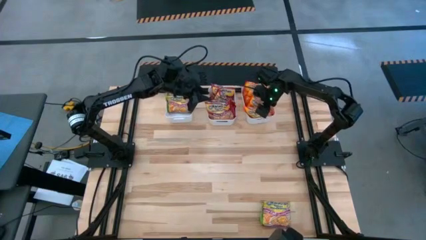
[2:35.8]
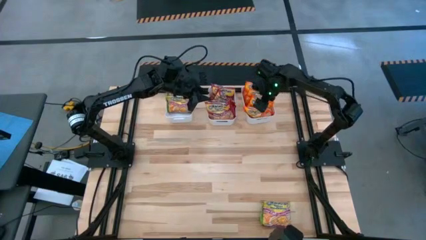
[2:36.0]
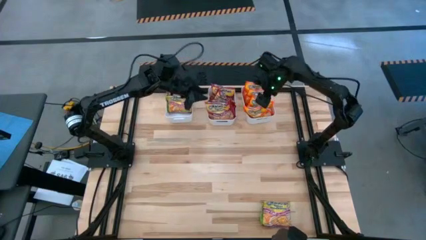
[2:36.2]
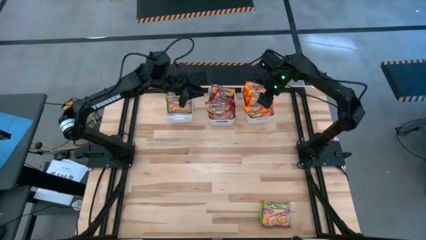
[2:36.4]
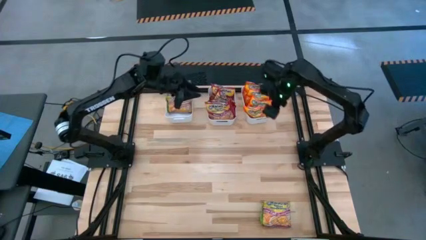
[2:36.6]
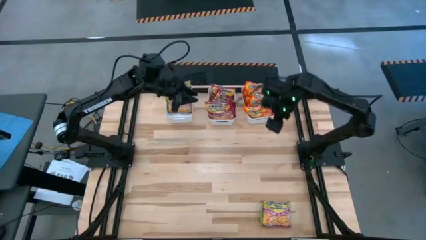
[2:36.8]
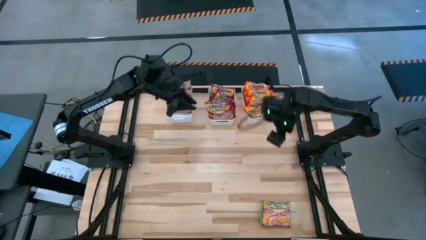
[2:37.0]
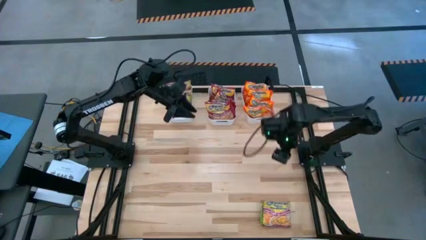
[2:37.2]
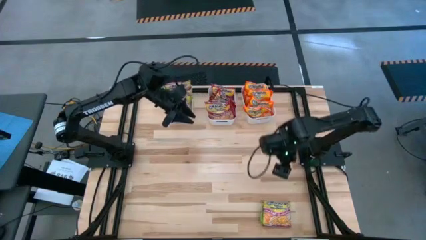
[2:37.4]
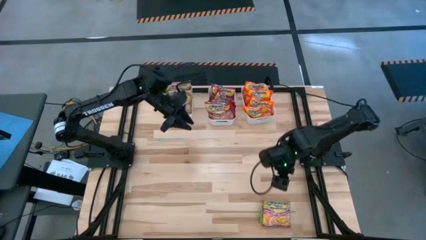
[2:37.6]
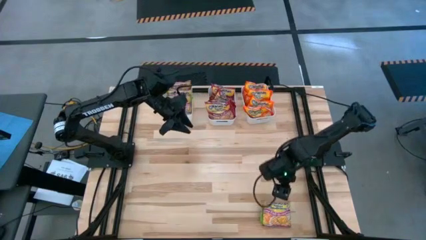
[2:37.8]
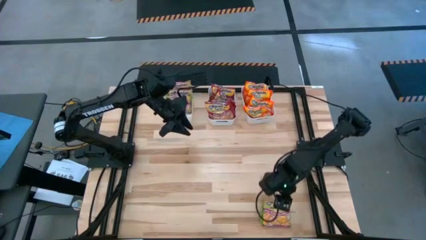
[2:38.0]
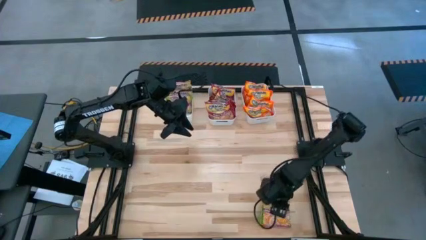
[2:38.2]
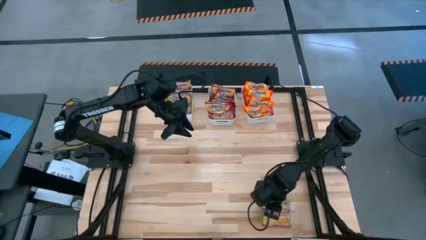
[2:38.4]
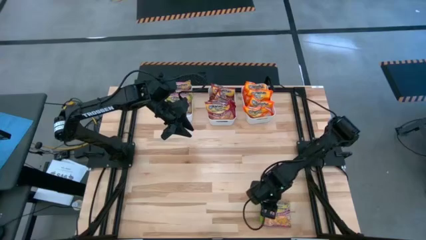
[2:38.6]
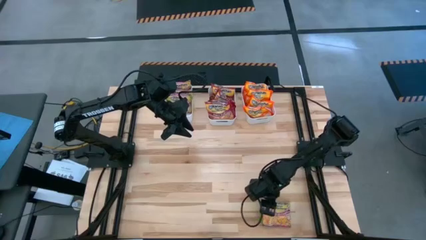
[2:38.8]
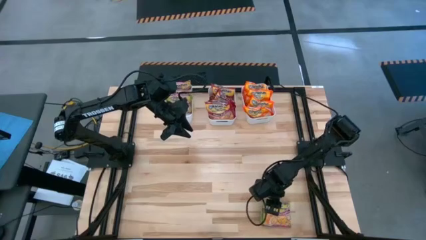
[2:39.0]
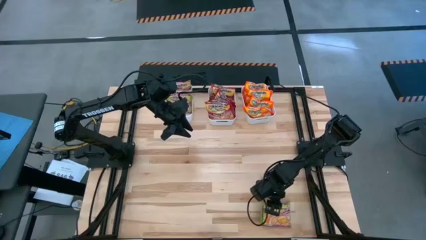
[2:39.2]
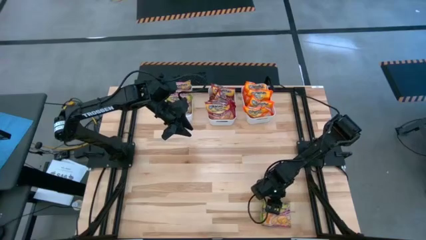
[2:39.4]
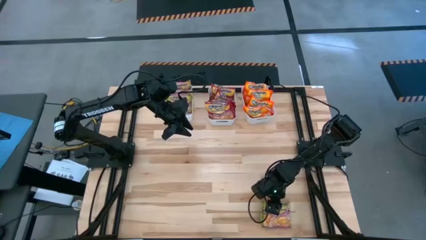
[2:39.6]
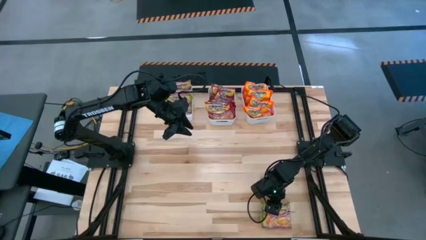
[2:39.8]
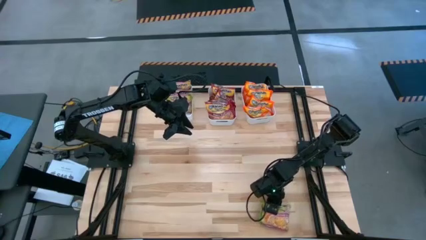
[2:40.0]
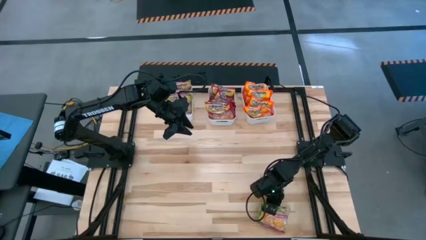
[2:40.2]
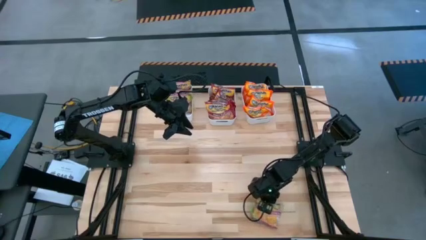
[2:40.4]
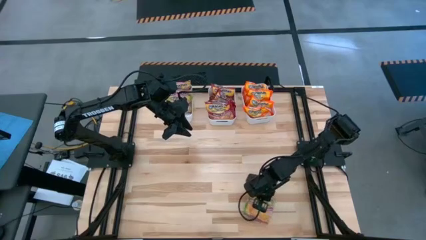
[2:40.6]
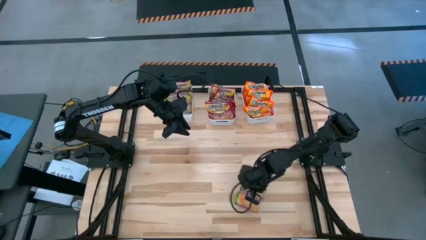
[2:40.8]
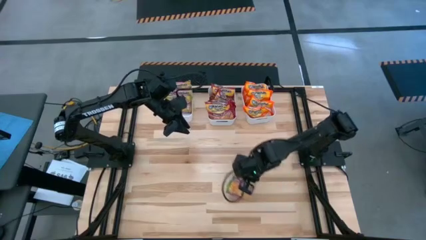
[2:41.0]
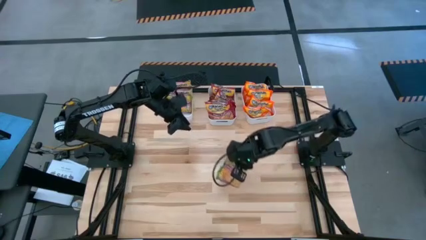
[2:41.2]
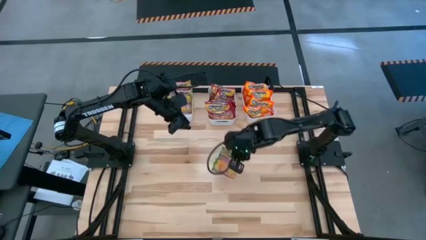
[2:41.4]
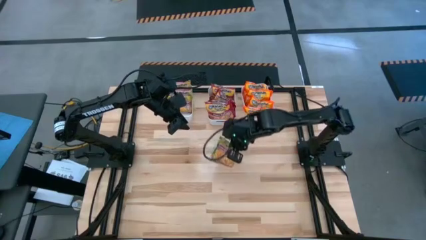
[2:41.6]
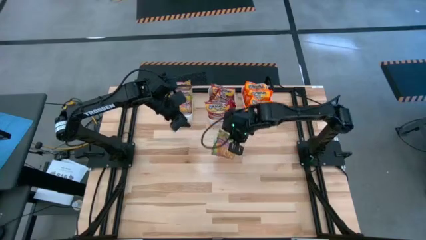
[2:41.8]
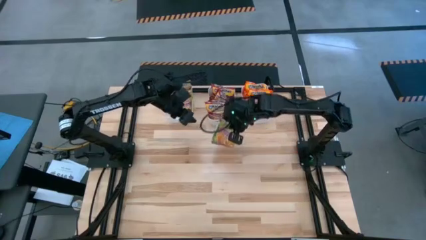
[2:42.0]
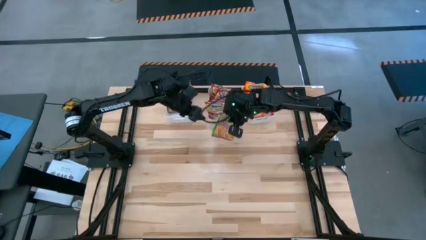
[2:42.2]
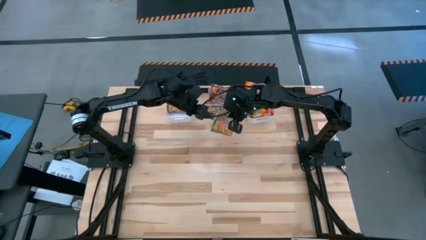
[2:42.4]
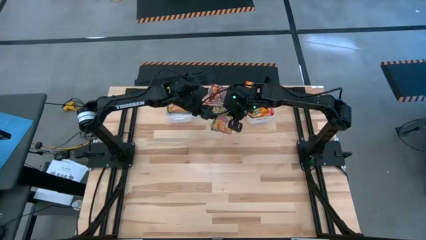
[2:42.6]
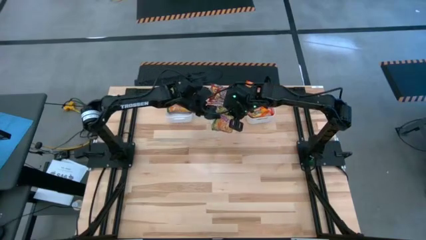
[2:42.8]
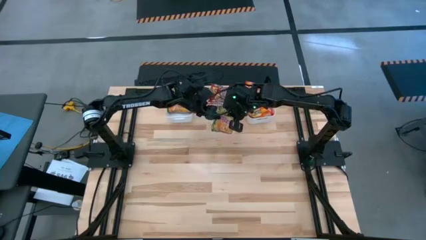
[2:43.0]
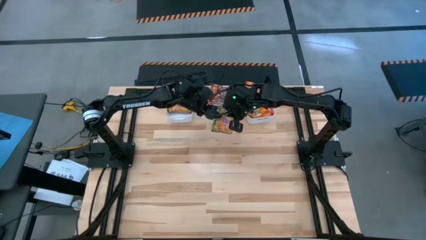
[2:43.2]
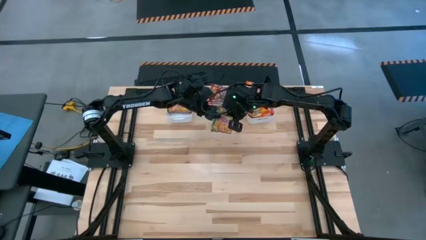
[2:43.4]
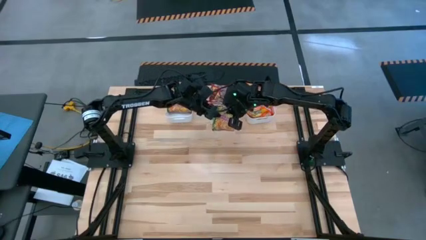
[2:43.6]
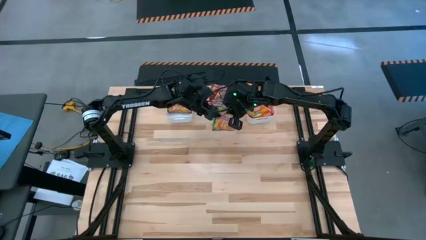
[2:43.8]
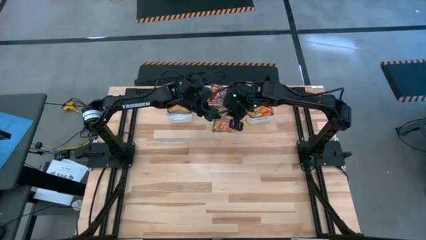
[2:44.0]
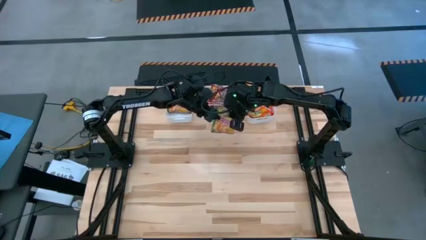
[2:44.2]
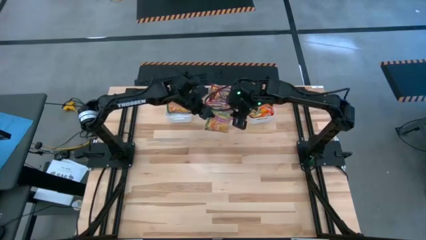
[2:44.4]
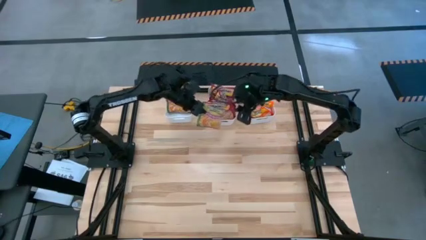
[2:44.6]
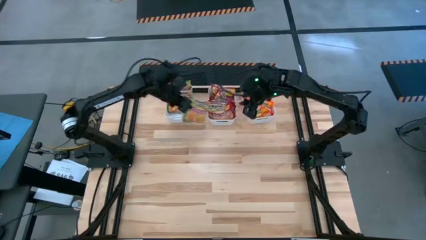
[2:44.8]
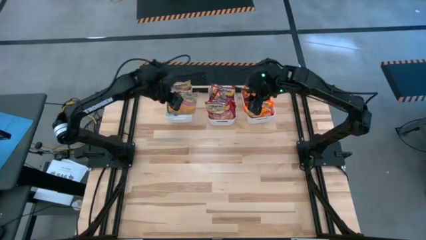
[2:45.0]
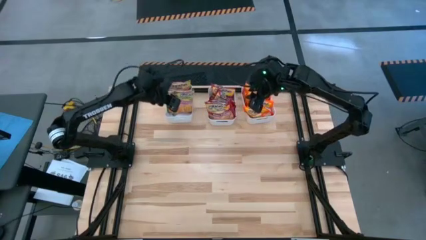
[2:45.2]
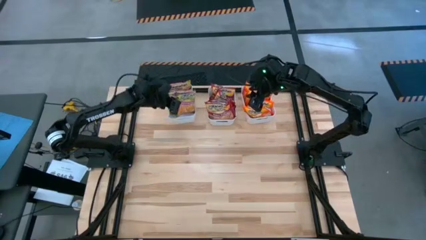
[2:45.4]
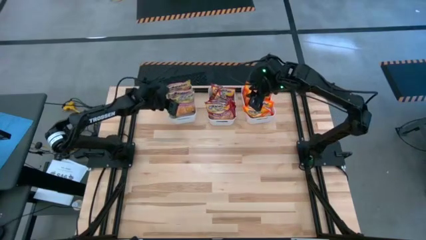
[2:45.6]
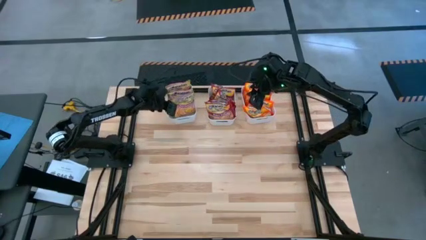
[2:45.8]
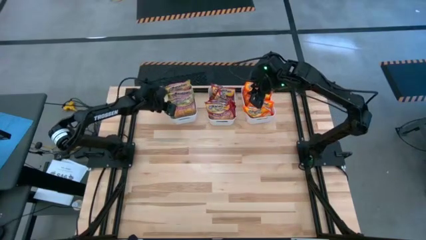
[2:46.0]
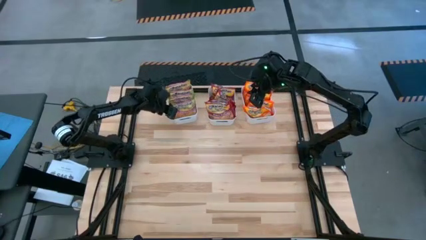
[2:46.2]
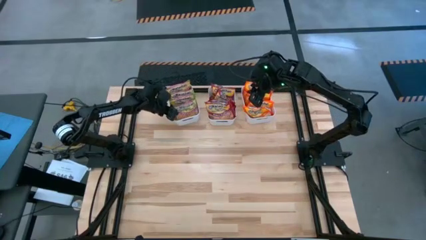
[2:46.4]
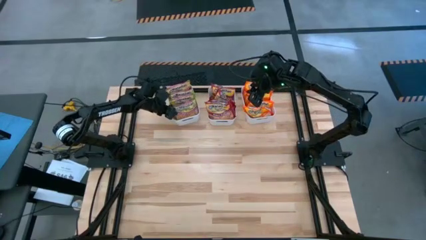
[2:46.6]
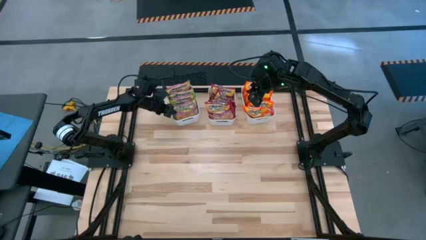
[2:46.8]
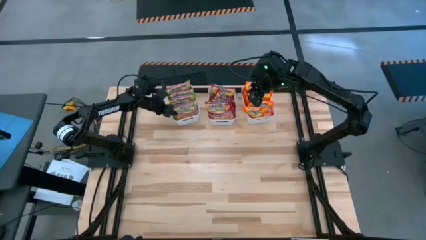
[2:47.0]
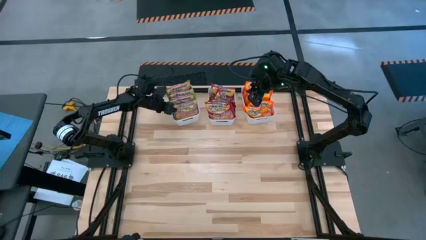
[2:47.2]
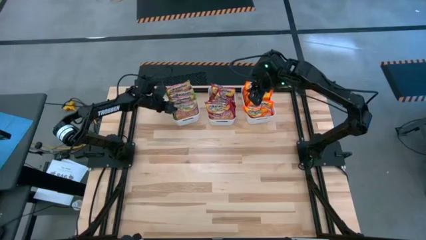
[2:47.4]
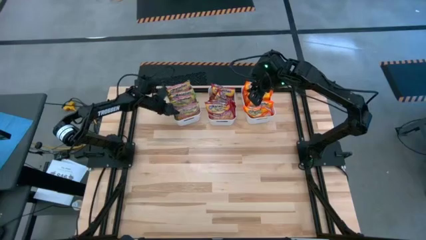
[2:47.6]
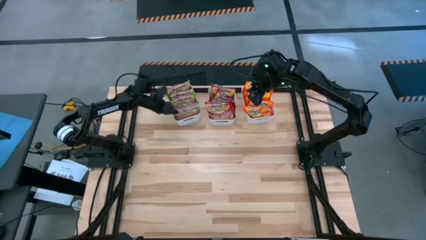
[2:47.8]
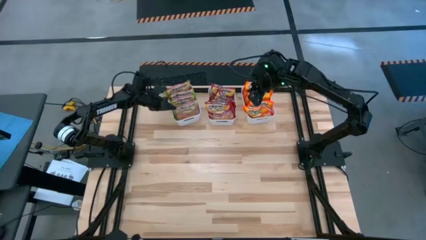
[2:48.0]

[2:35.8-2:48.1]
Task: Sort Maruchan noodles
Put the green noodle pack into the left white bin

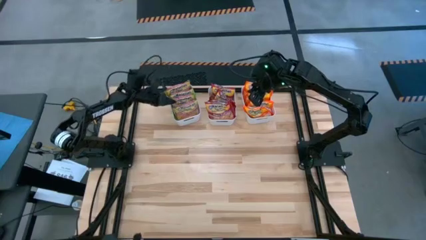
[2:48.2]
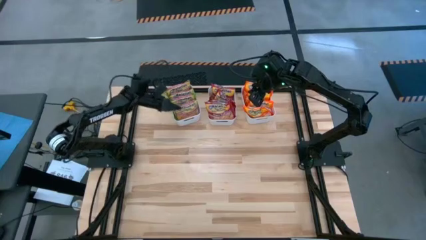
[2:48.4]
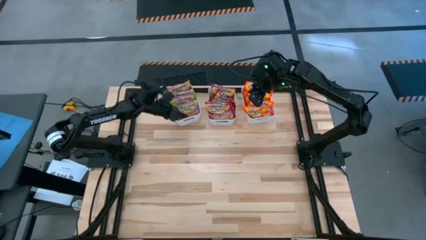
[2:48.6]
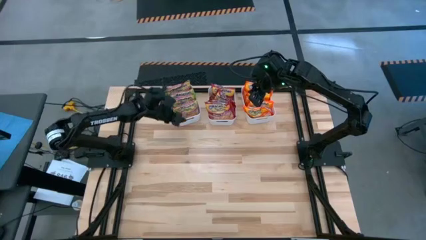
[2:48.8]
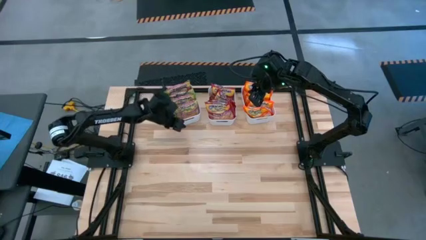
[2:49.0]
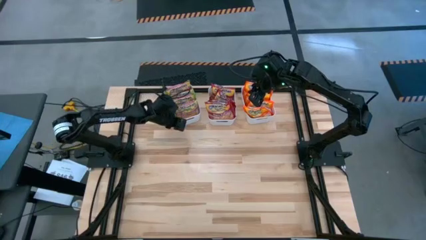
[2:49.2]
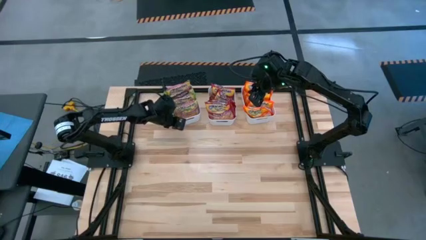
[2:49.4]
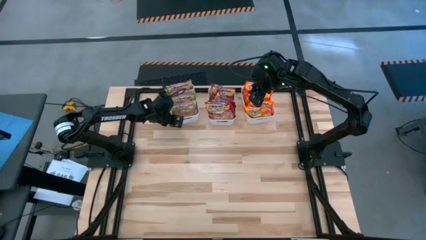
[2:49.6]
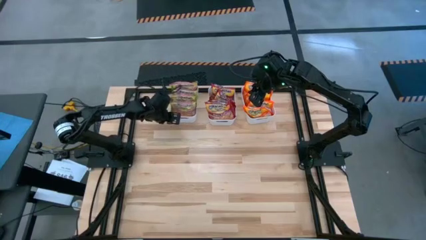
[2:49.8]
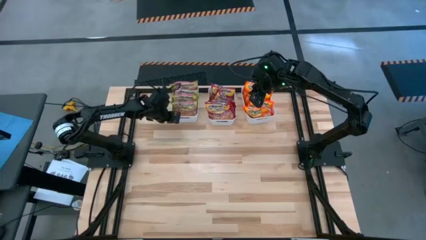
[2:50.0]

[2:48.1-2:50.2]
Adjust the left white bin

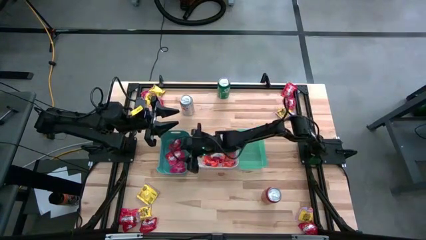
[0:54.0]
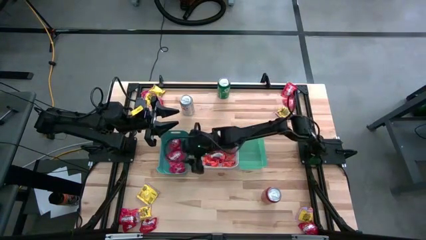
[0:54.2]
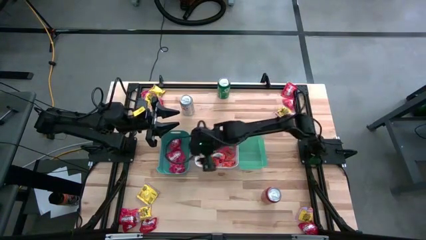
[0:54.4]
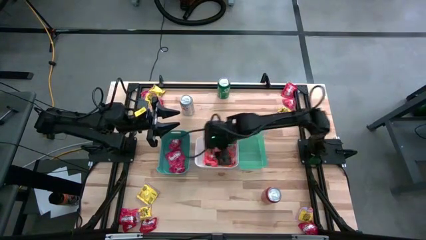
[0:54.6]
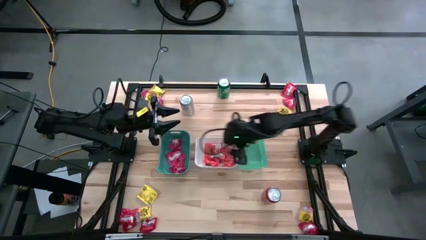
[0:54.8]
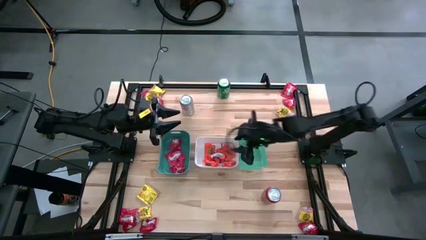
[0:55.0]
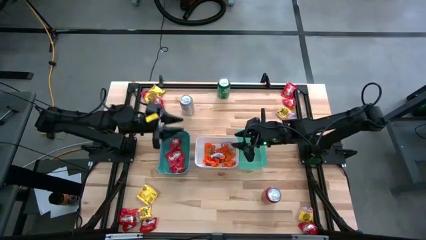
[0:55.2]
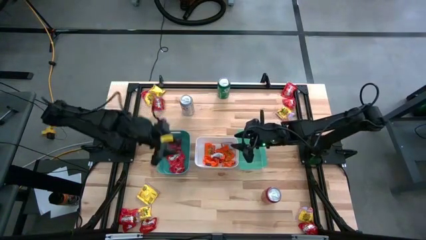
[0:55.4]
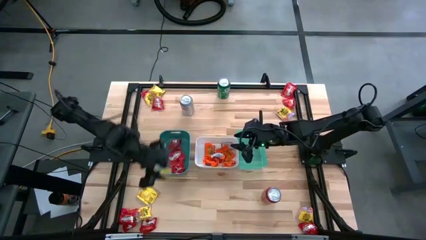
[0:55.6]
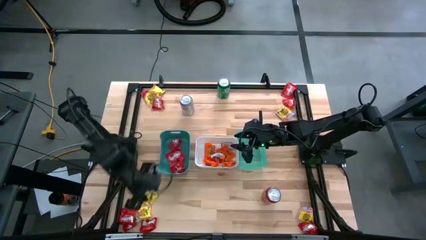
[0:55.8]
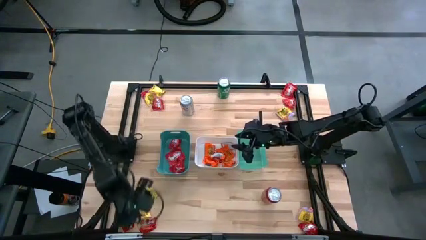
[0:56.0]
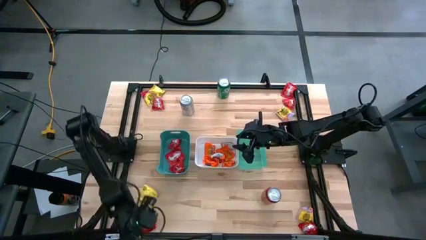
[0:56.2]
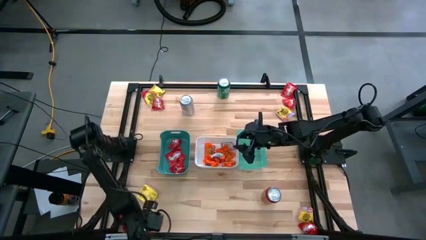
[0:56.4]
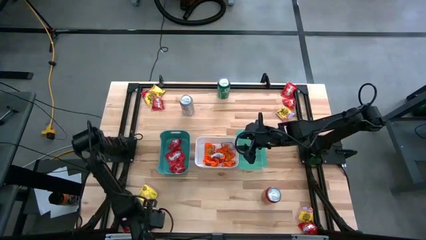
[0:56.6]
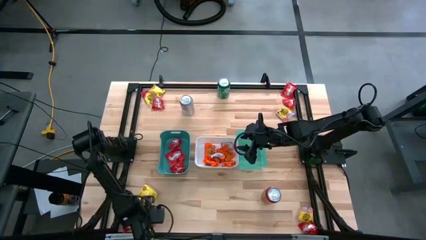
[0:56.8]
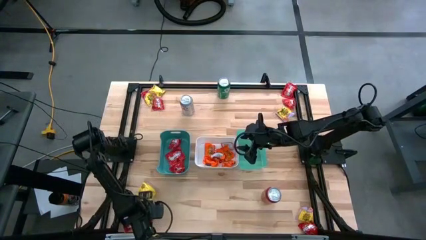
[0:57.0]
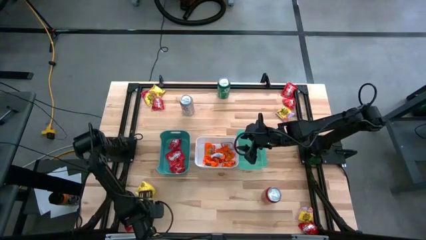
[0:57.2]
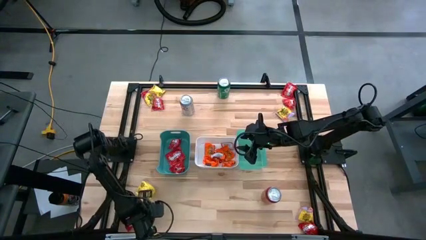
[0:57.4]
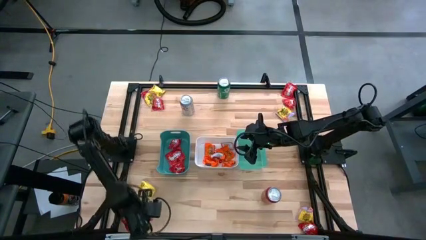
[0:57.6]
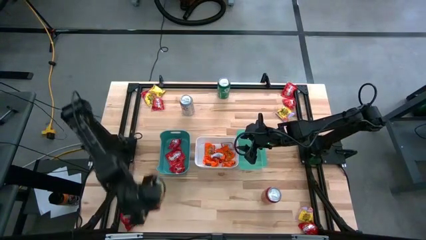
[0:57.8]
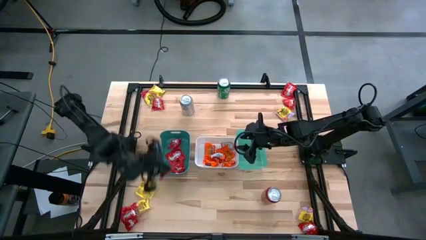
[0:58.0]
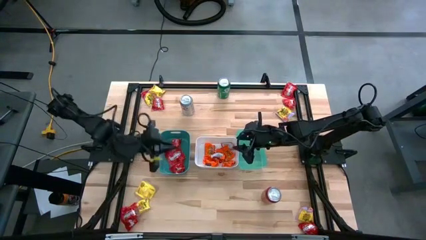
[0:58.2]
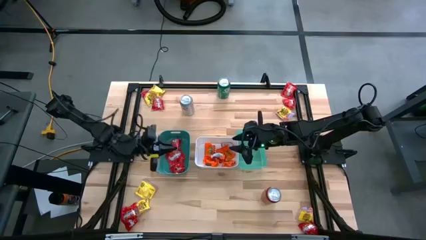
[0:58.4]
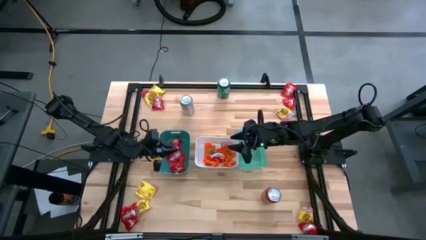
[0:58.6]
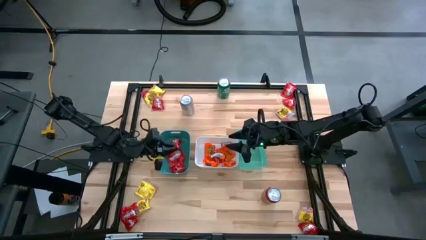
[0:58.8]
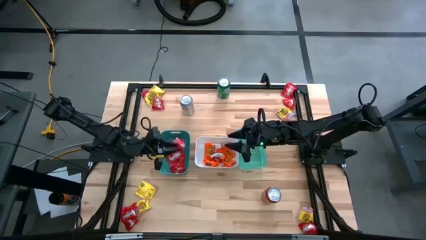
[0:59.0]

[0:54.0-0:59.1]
Task: Sort candy
Put the red candy into the green bin
